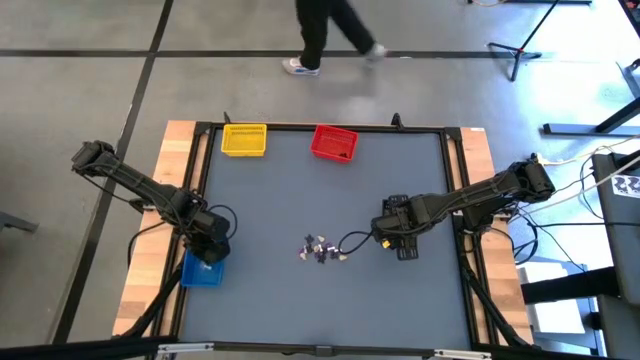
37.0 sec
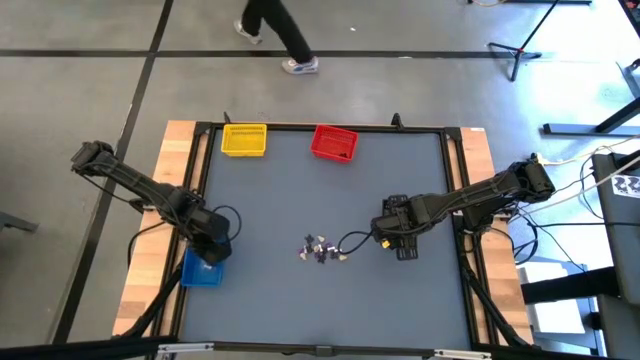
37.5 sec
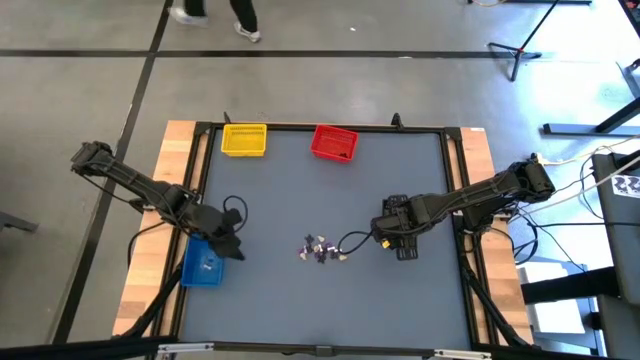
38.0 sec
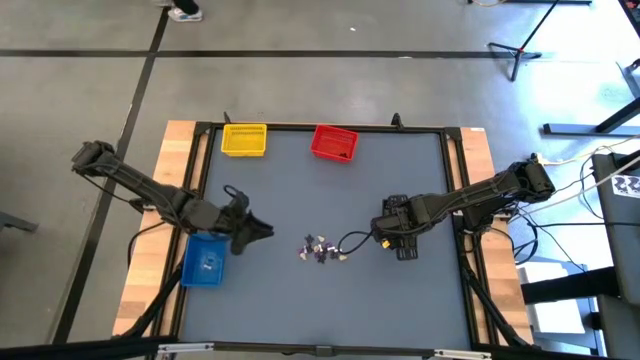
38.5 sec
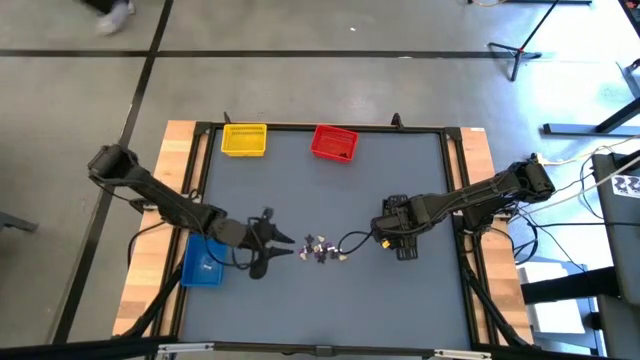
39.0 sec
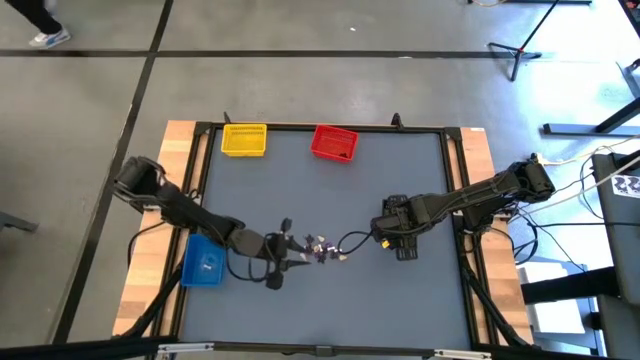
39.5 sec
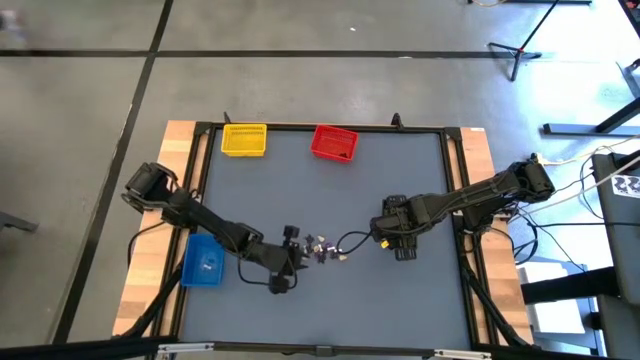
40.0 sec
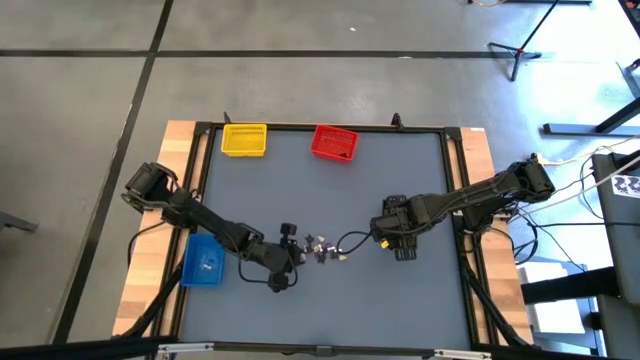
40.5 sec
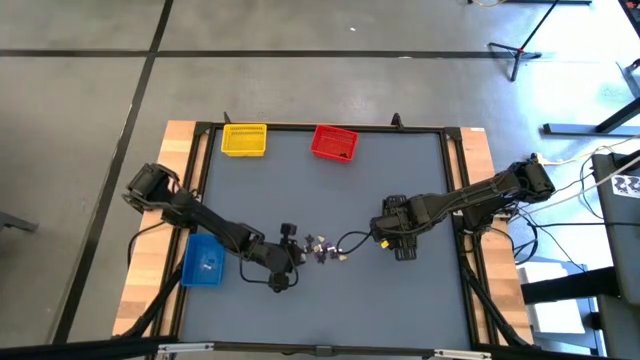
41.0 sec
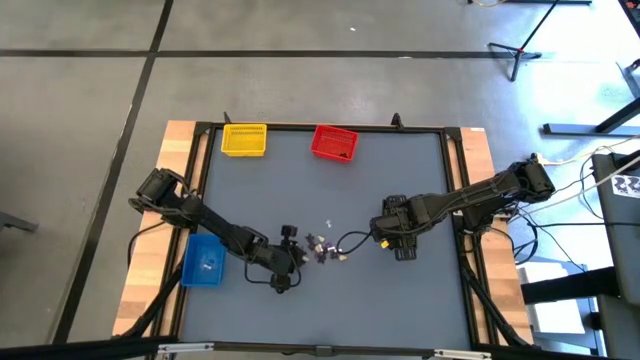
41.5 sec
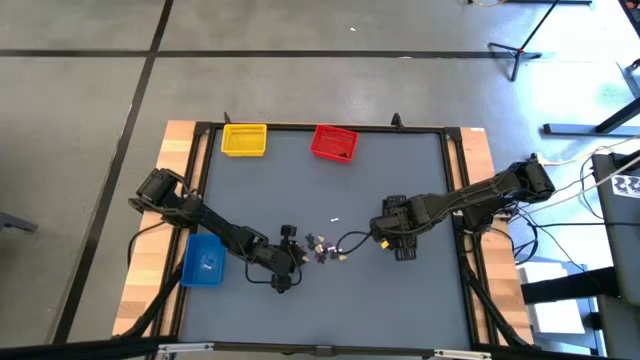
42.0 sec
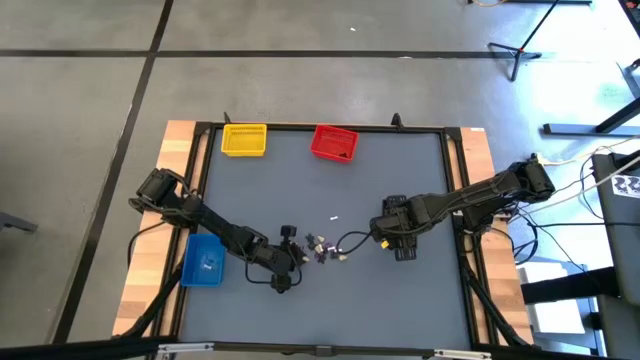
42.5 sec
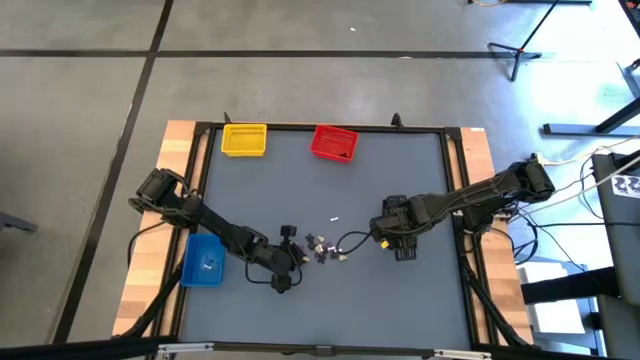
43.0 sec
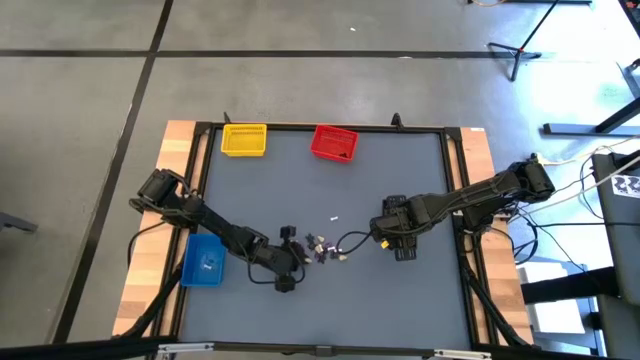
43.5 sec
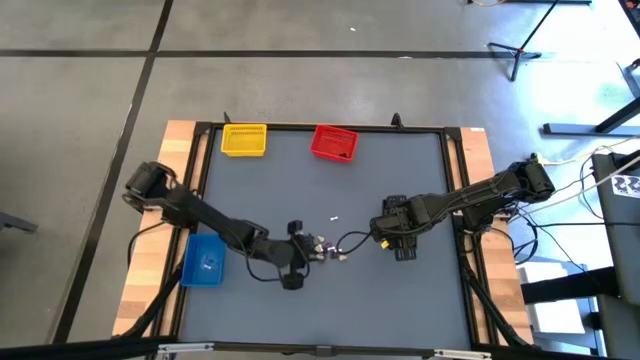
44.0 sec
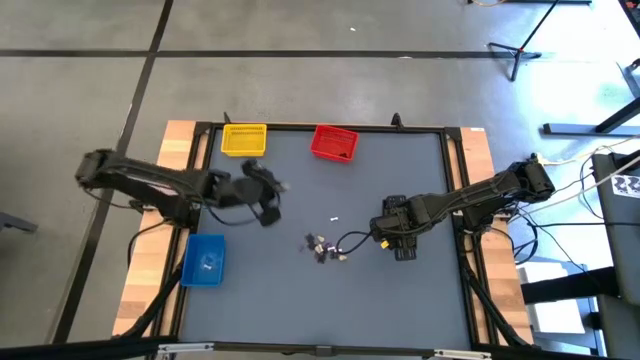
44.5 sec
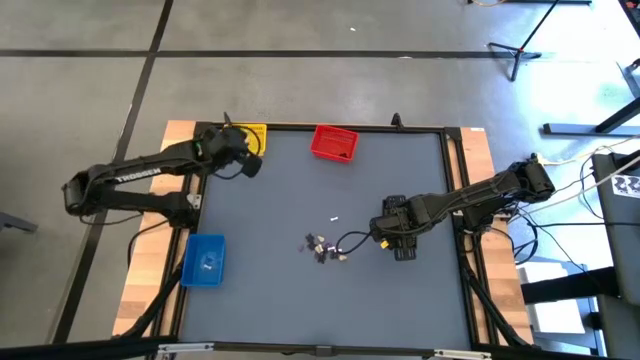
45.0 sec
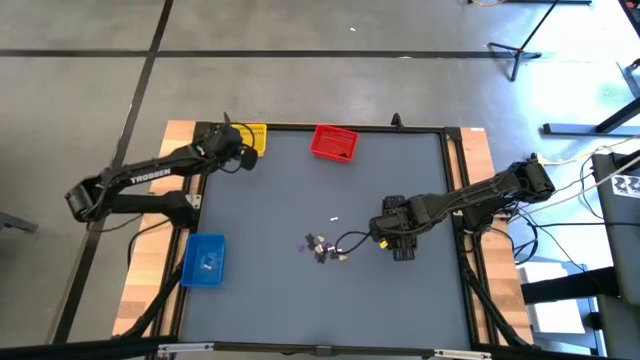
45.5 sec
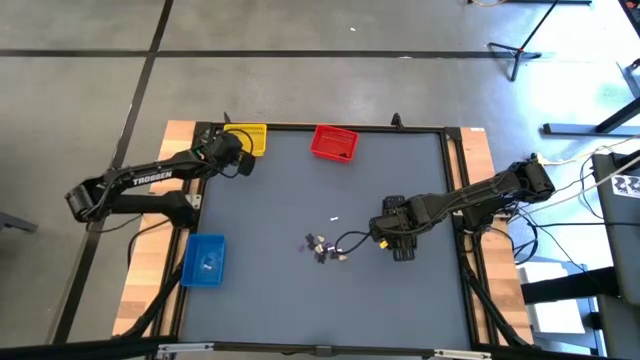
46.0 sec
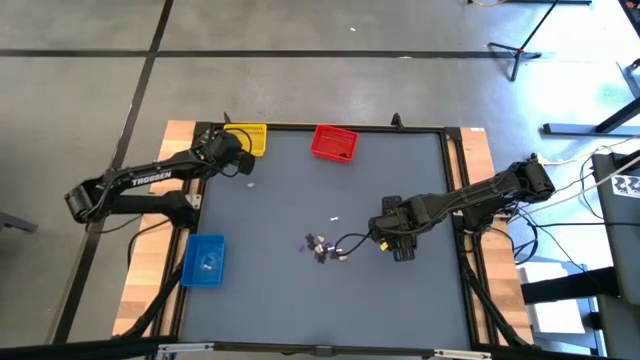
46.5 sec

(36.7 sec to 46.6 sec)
Task: Sort Halloween decoration
Put the yellow skull toy into the yellow bin

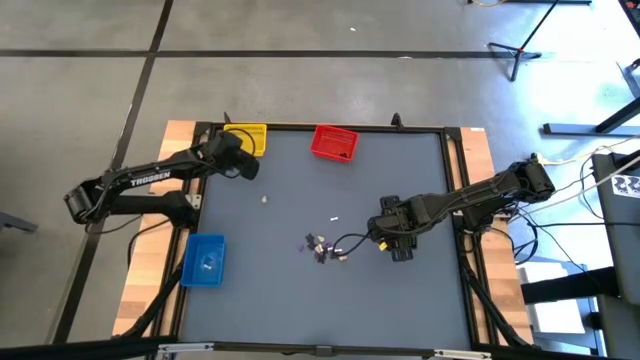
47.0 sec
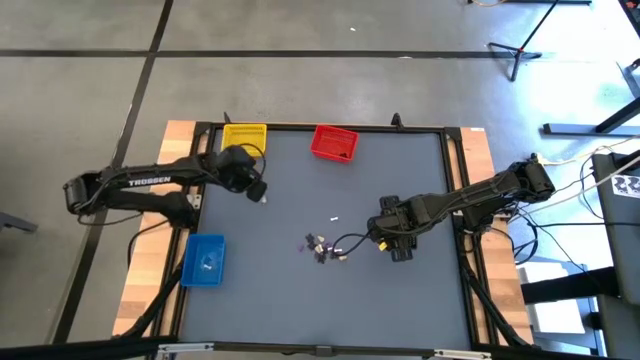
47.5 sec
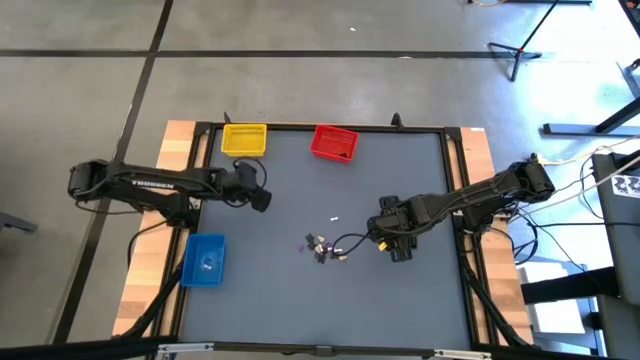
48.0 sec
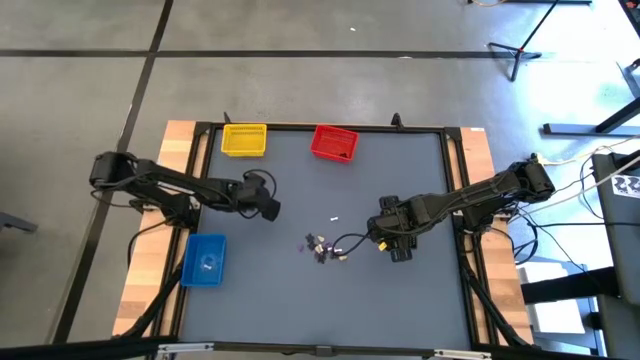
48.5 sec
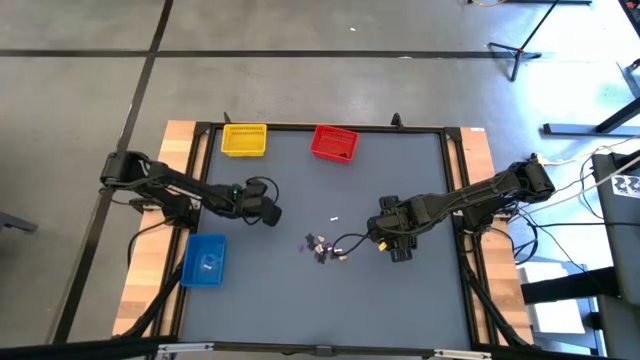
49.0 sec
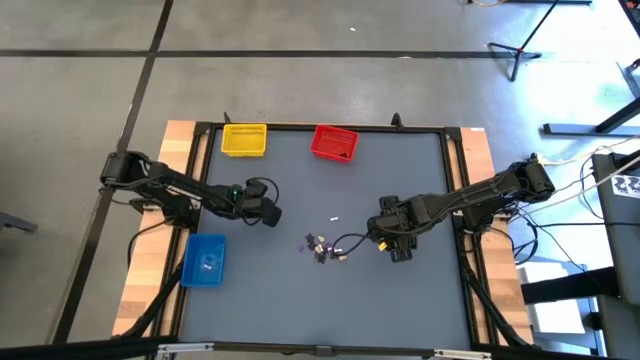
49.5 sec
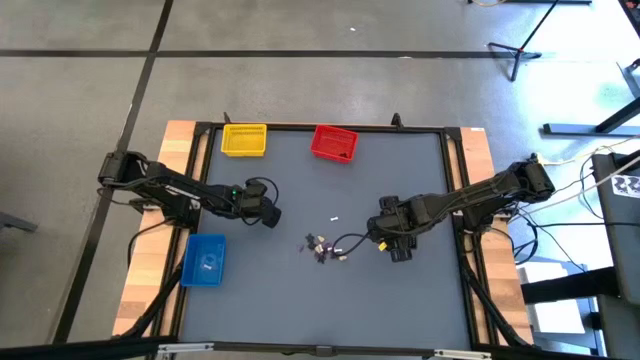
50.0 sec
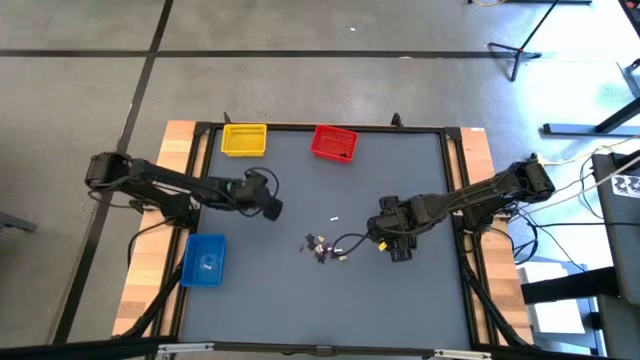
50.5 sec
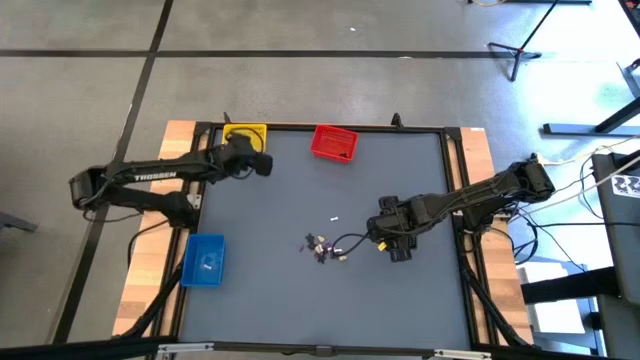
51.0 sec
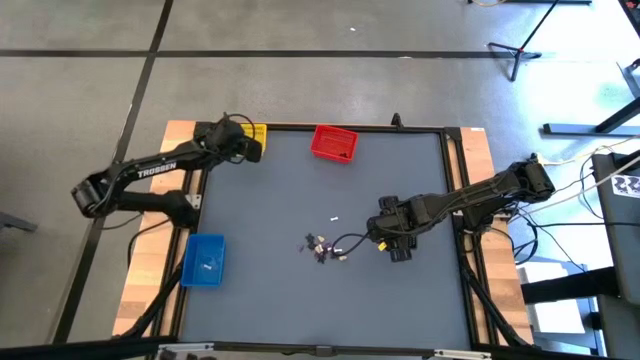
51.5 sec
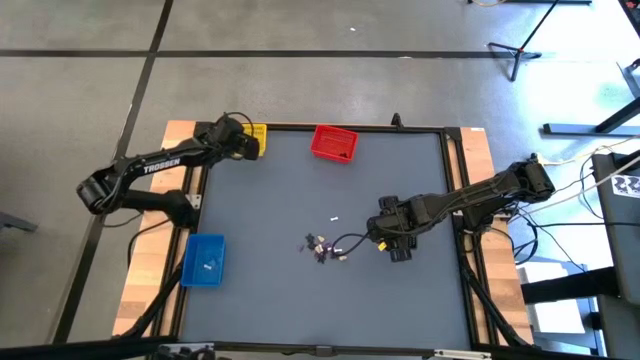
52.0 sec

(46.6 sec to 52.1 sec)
Put the yellow skull toy into the yellow bin

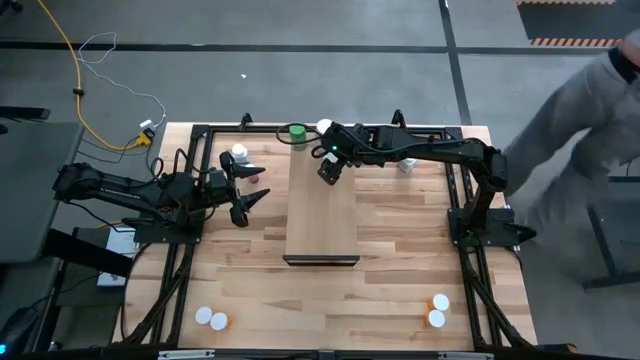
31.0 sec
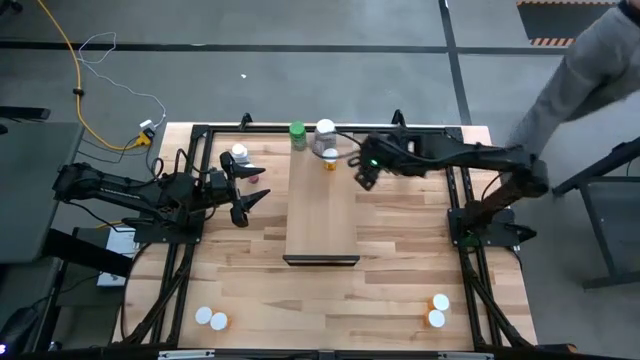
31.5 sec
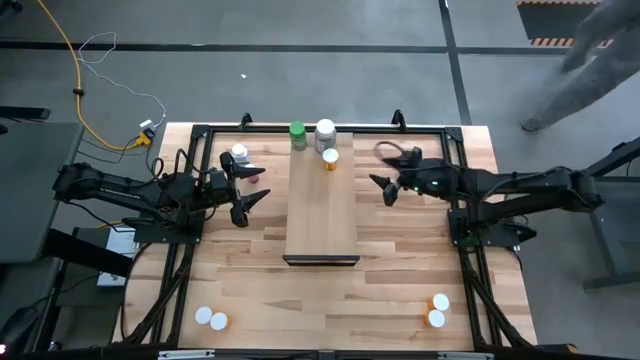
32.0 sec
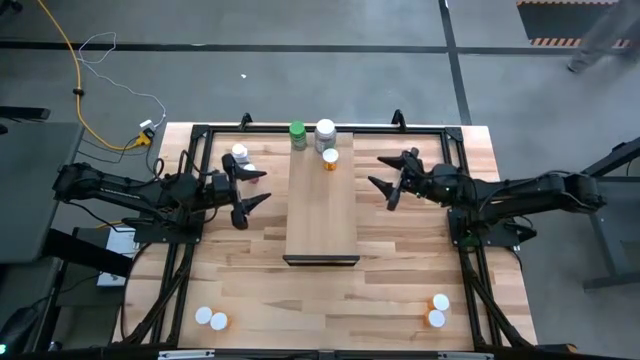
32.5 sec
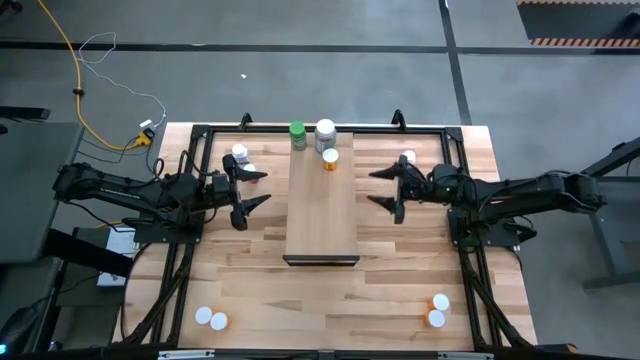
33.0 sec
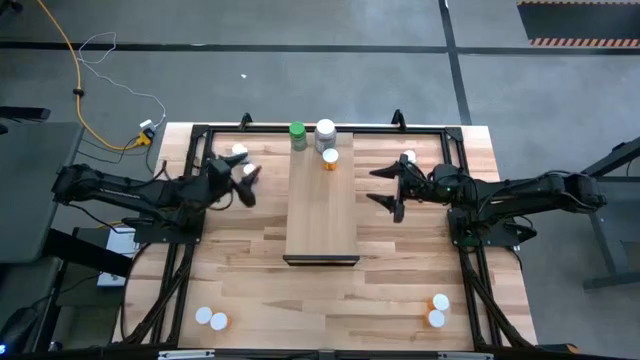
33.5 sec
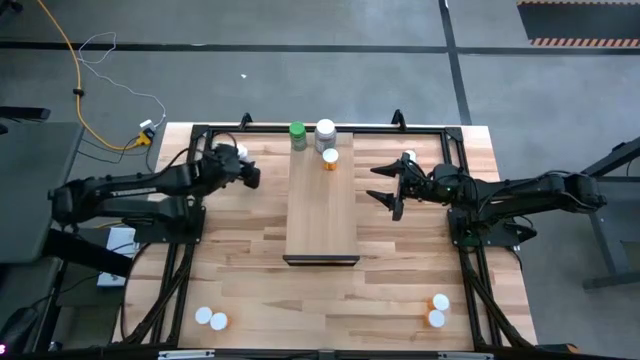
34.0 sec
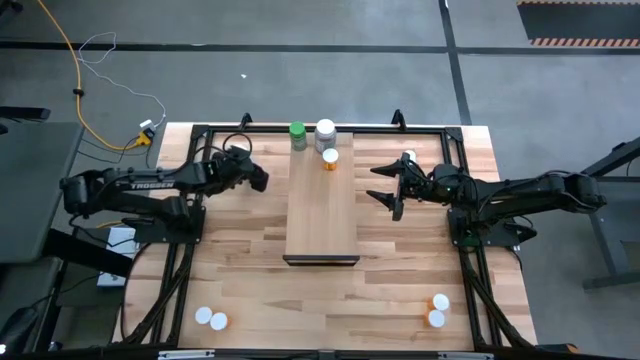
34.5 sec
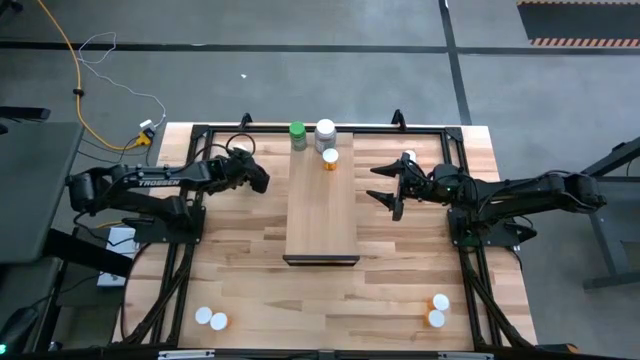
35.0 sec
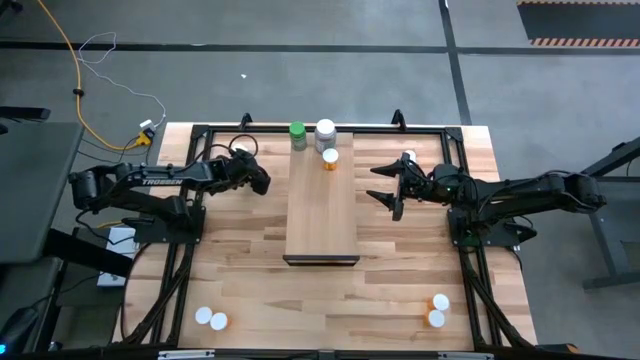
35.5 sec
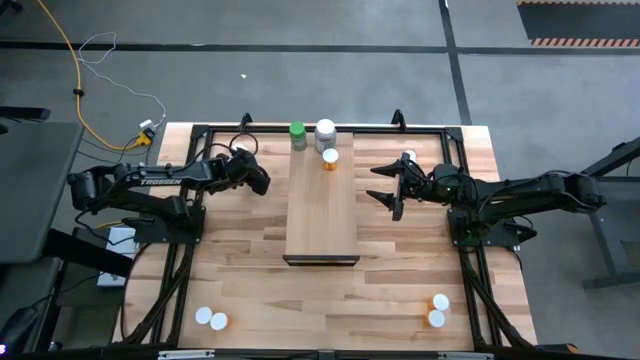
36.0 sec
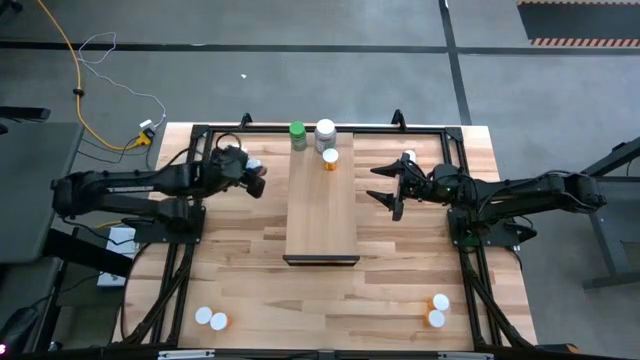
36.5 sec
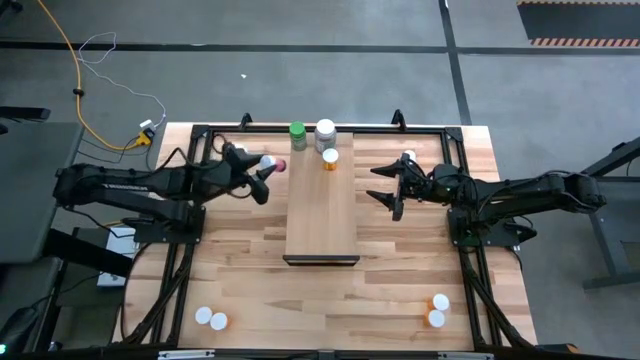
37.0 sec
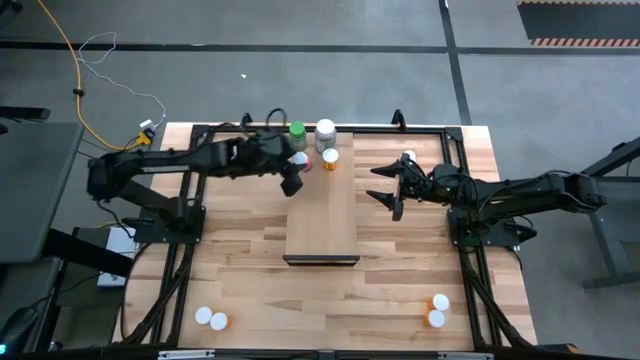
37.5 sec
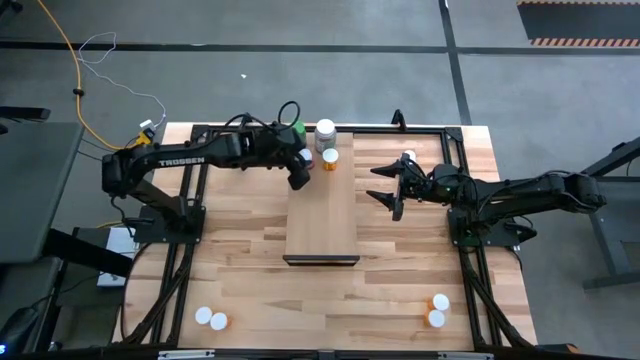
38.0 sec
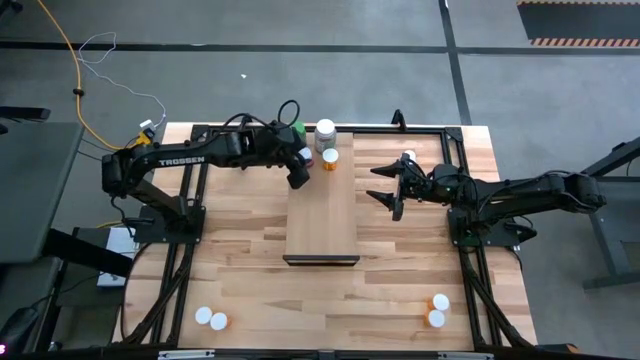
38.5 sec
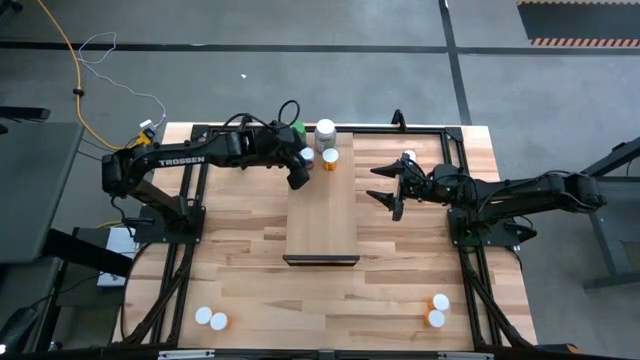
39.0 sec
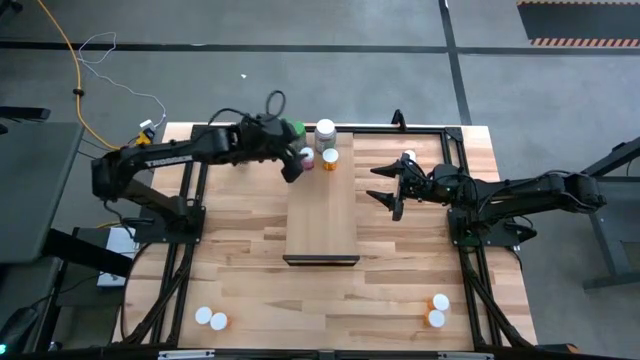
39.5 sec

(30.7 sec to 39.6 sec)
Task: Pick and place medicine bottles onto shelf by color
Put the pink pill bottle on the shelf
